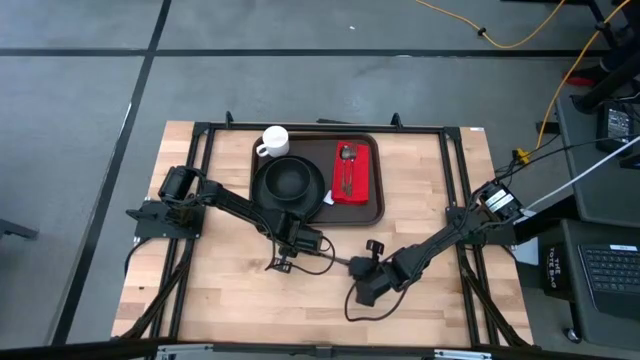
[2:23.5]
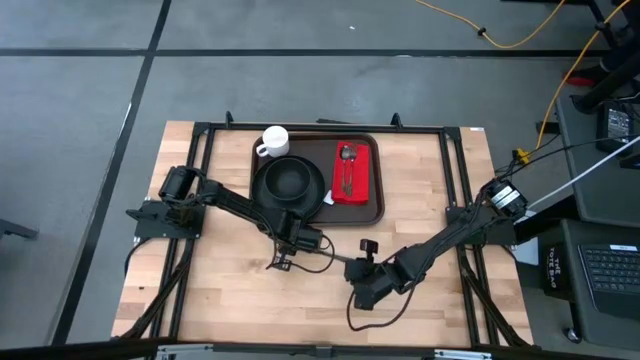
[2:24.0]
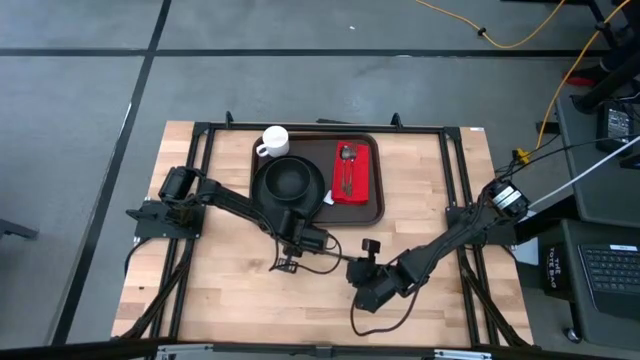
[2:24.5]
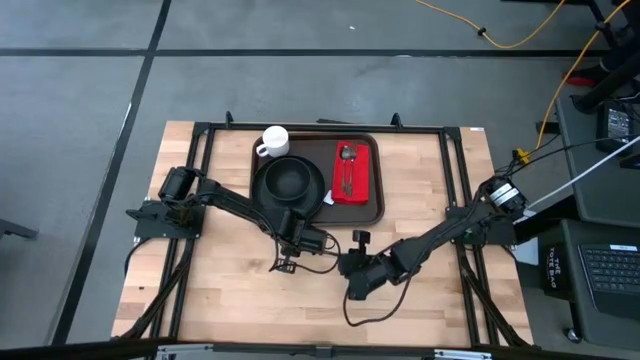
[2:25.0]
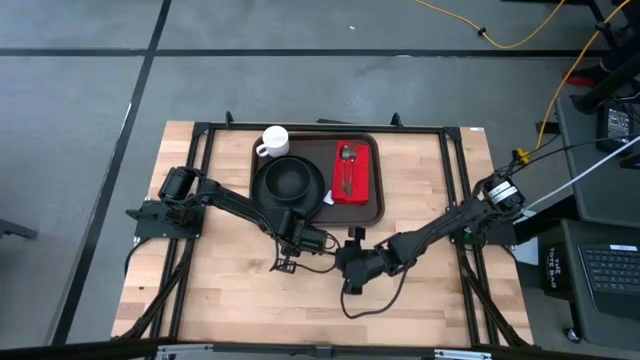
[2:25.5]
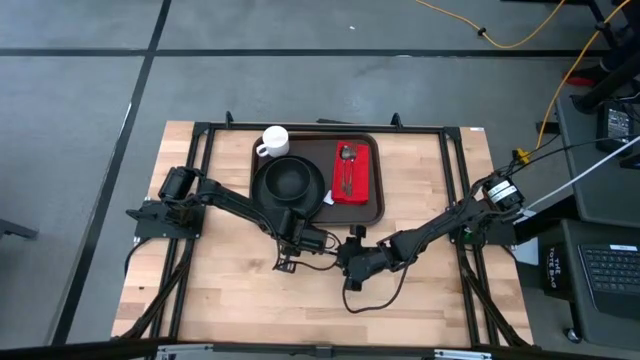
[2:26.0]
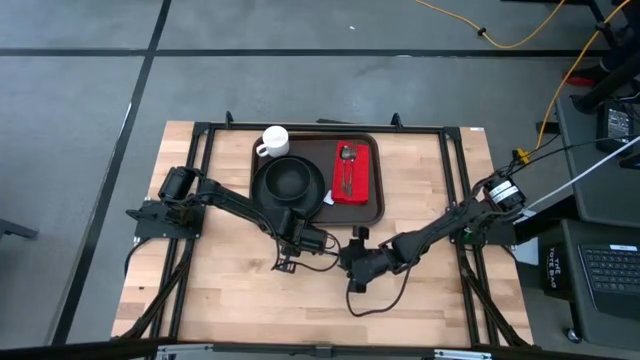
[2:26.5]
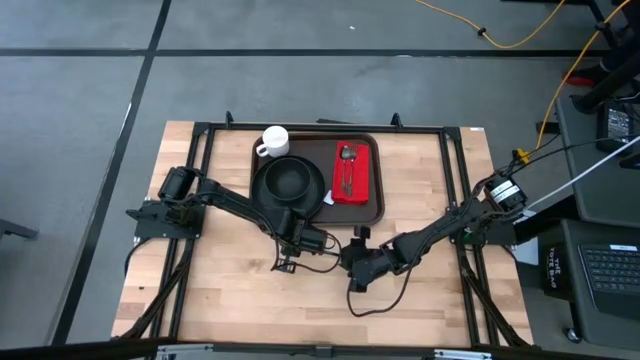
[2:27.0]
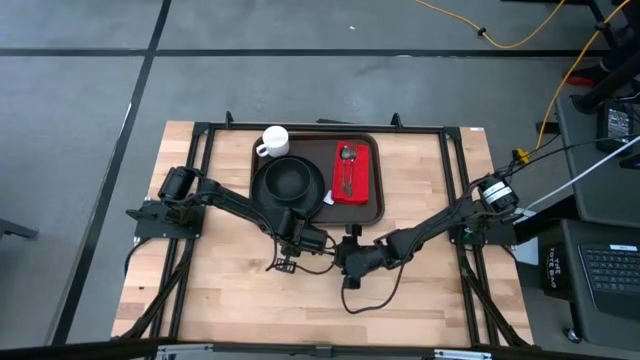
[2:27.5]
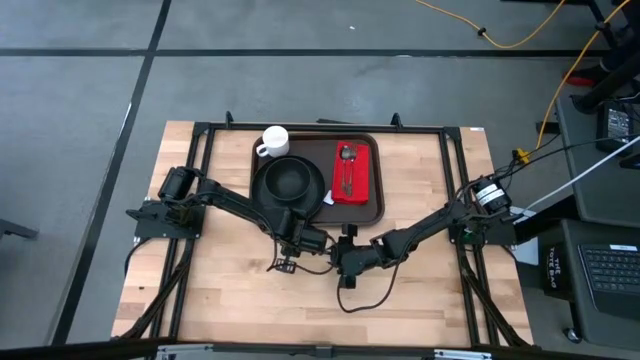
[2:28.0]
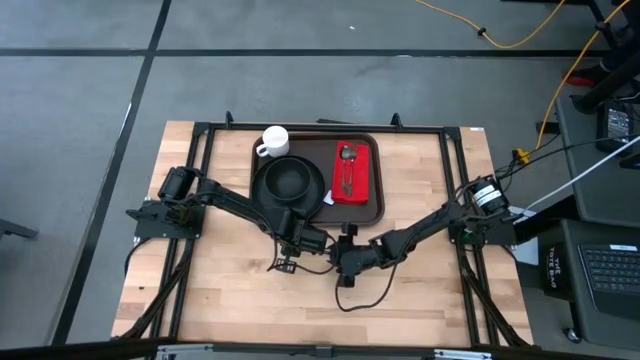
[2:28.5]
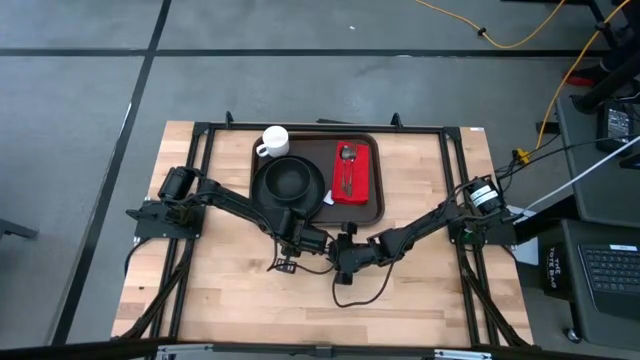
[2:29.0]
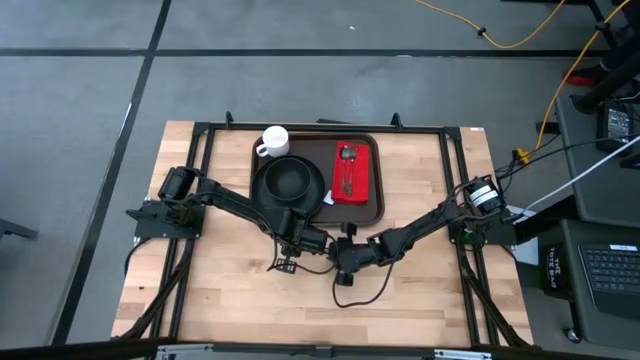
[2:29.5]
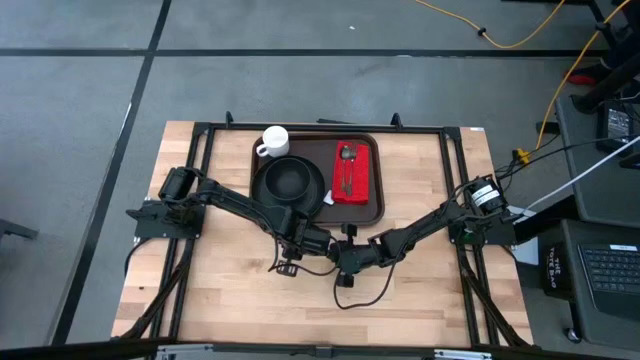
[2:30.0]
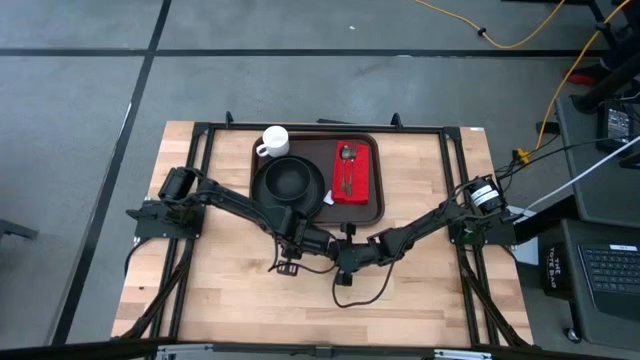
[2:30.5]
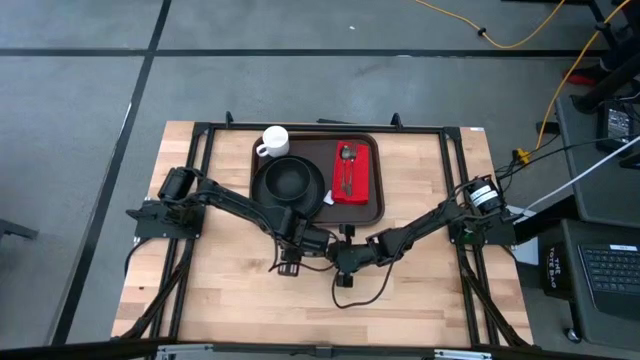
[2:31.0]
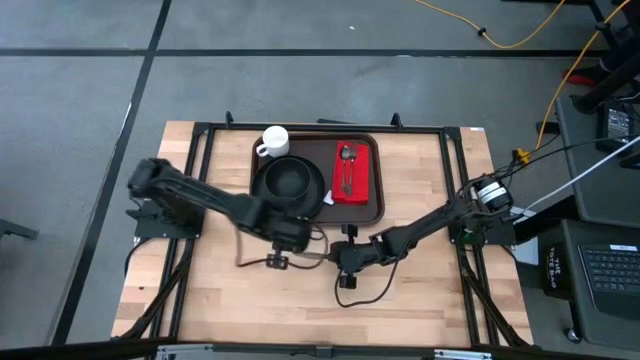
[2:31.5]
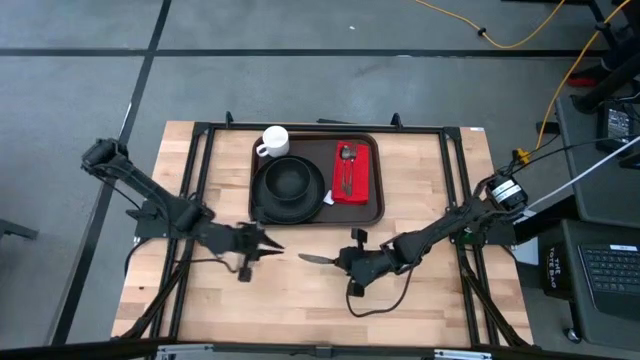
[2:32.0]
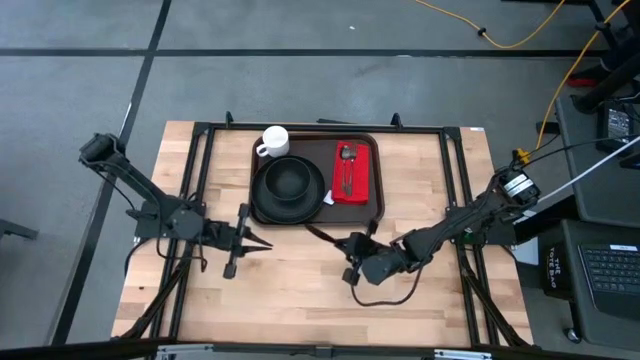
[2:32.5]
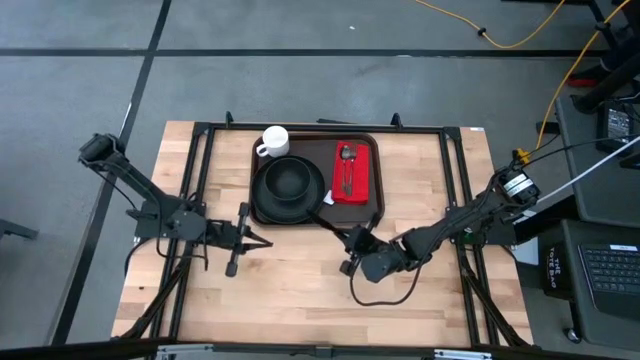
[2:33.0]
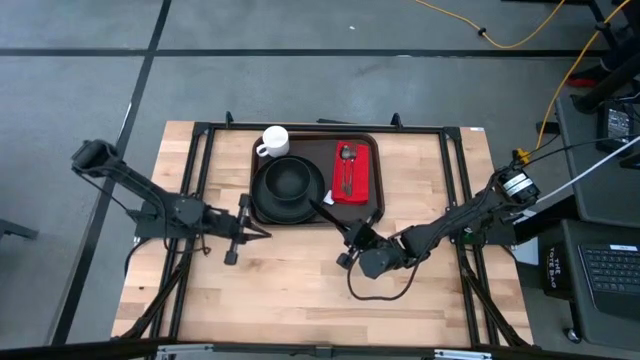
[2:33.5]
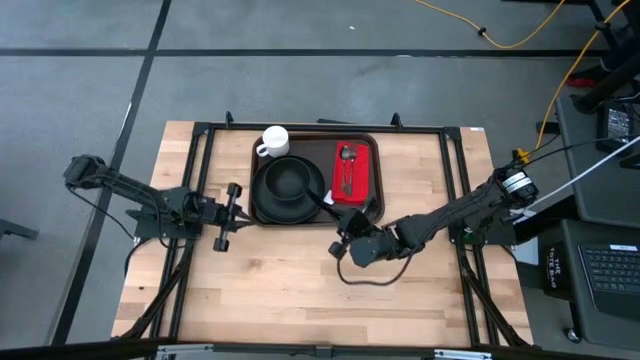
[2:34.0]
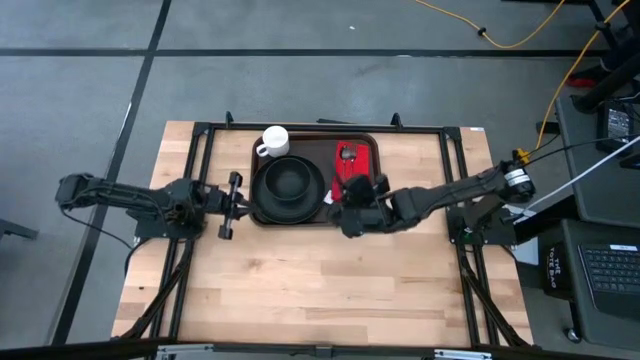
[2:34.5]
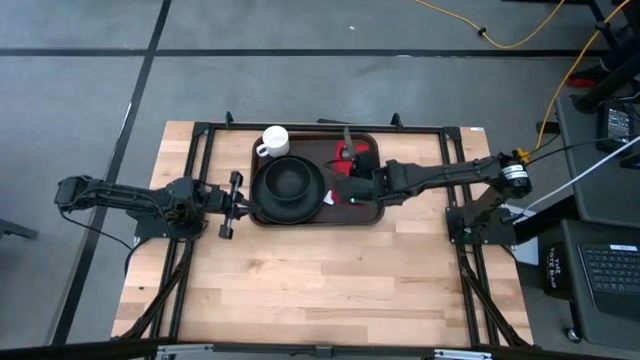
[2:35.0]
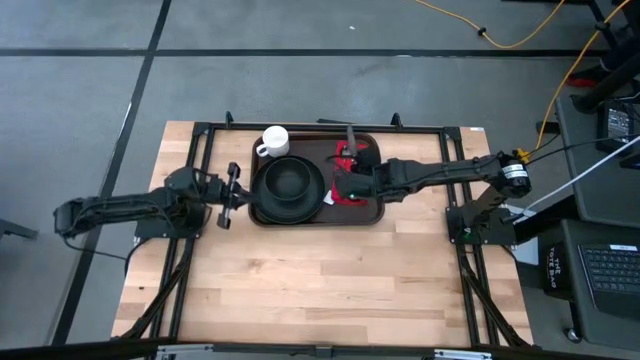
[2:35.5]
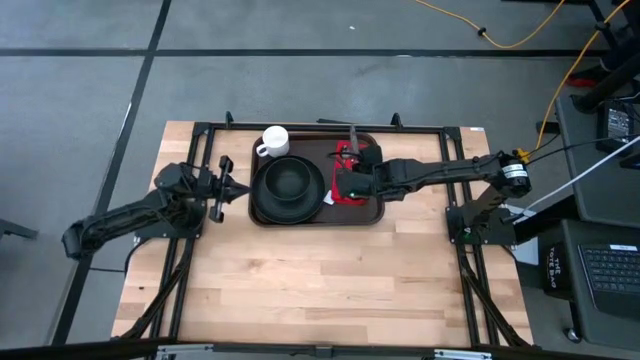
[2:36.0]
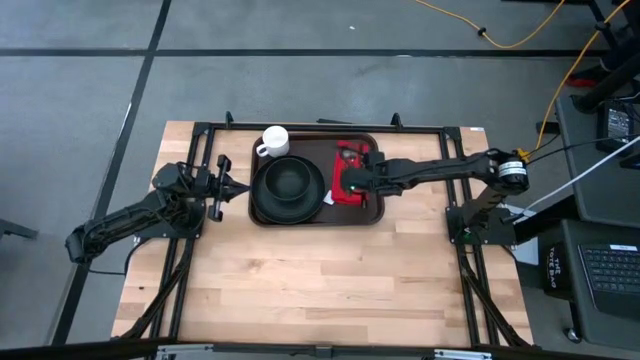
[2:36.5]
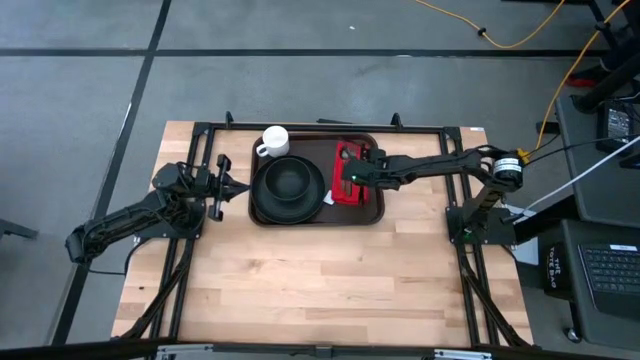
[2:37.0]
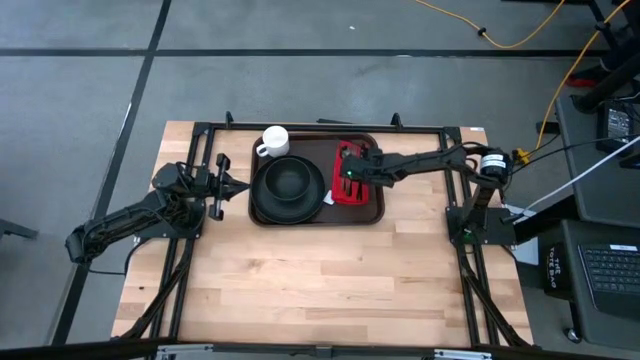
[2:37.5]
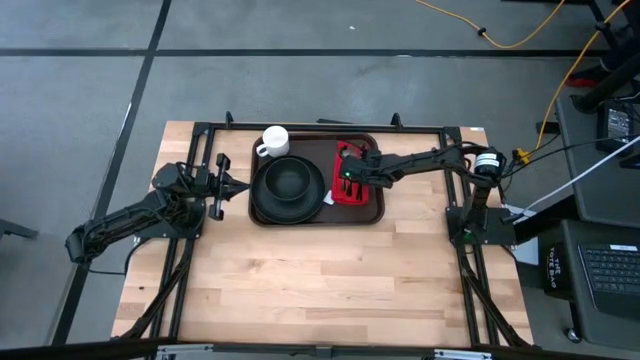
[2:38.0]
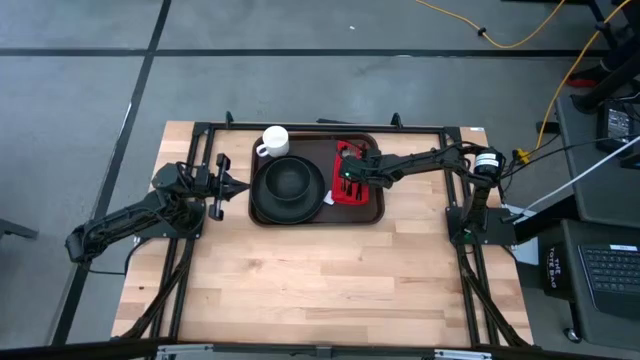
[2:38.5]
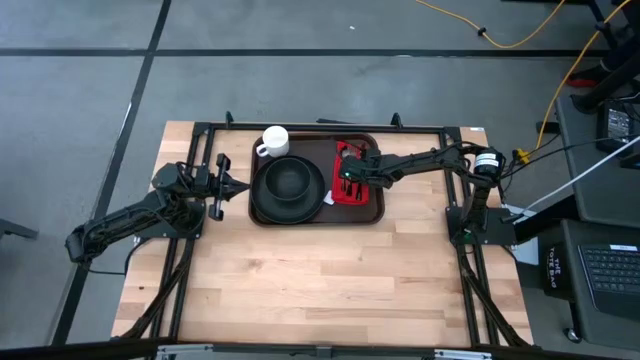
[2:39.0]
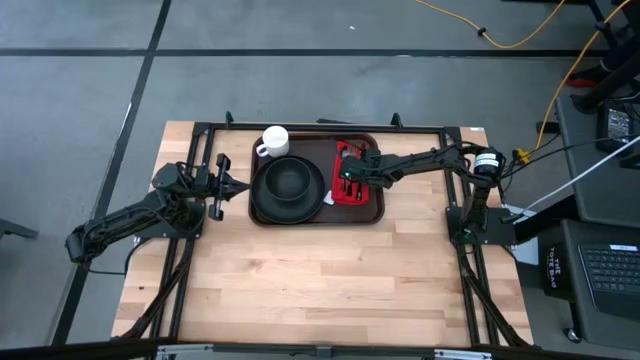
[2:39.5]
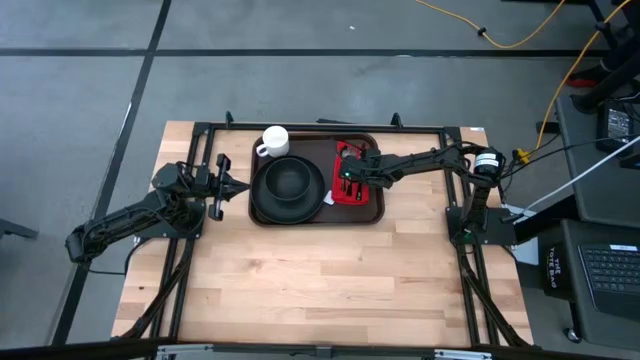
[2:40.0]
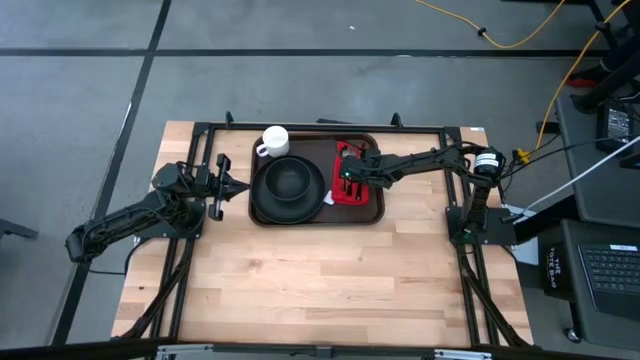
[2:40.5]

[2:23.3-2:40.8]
Task: Set up tray
Put the black table knife to the right of the black fork on top of the table napkin on the brown serving tray

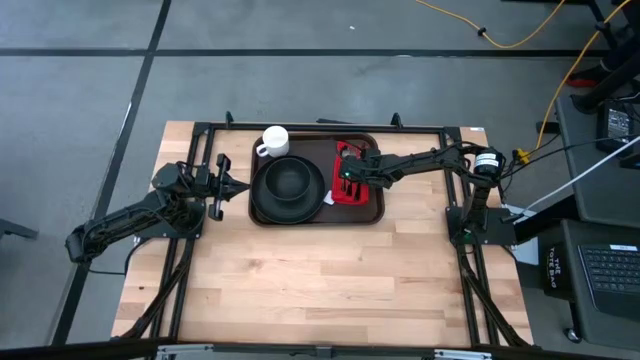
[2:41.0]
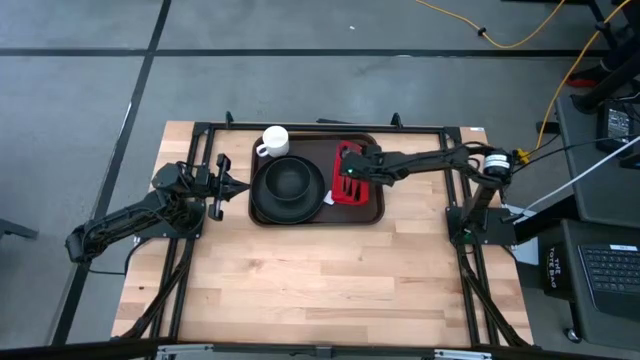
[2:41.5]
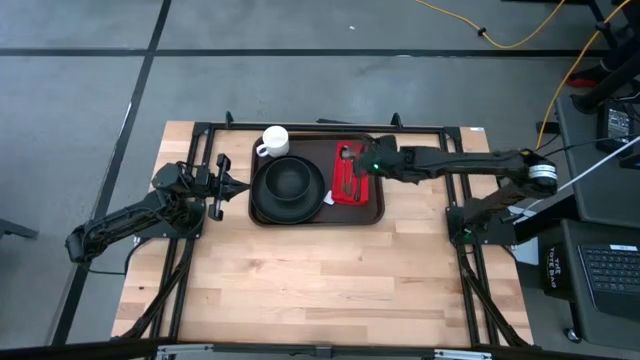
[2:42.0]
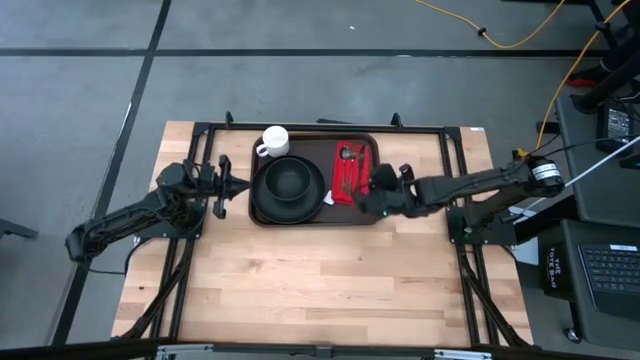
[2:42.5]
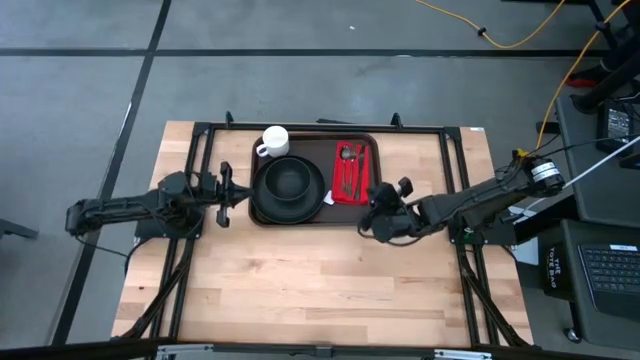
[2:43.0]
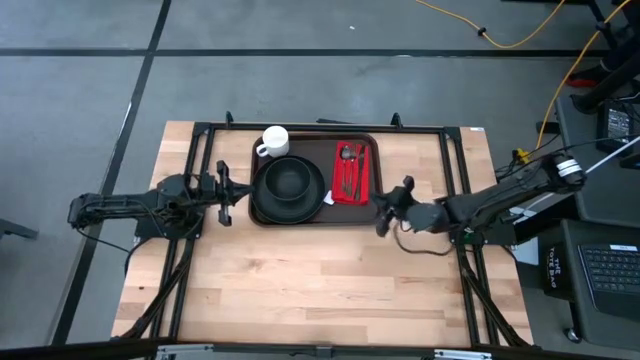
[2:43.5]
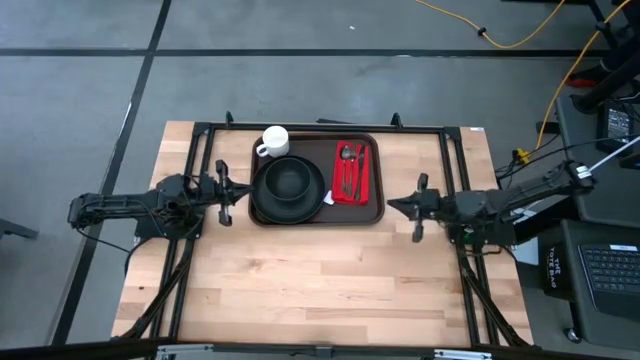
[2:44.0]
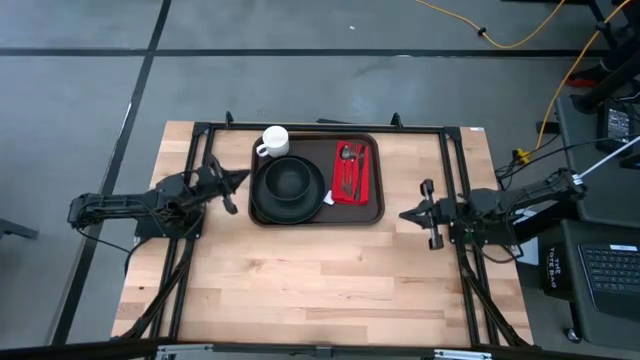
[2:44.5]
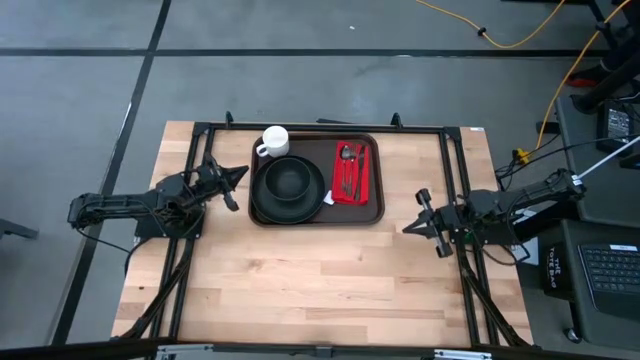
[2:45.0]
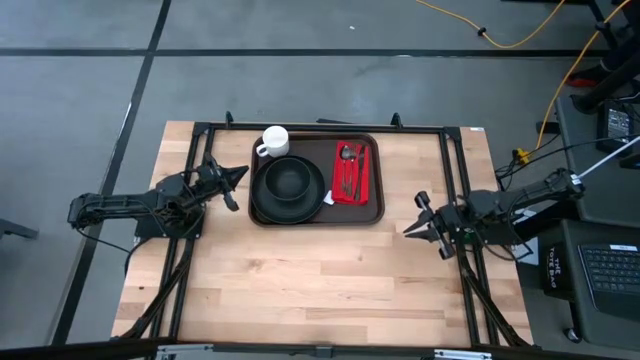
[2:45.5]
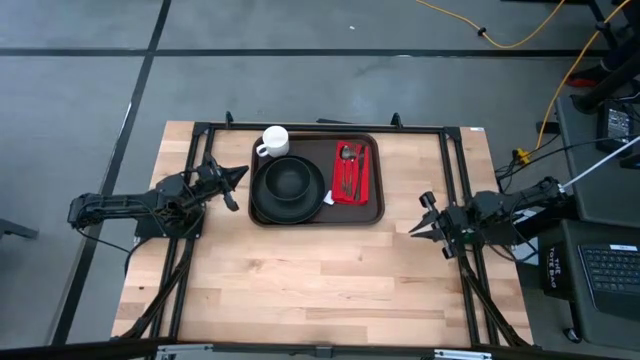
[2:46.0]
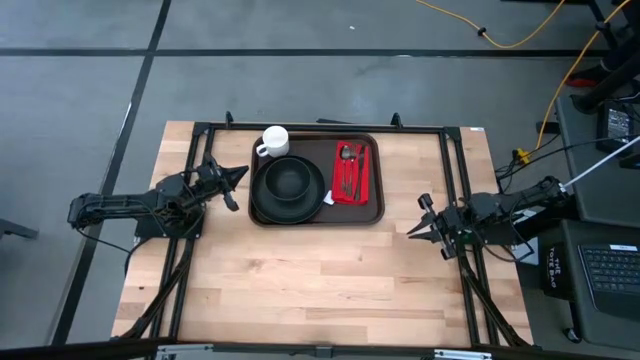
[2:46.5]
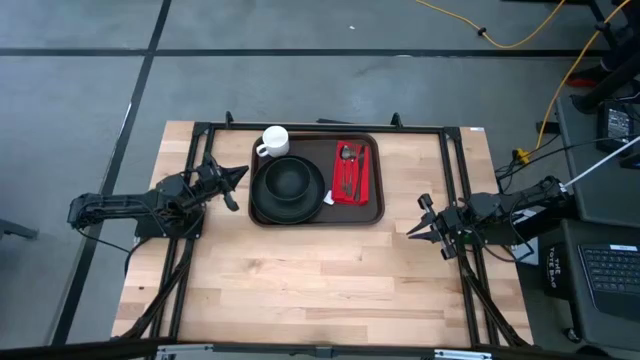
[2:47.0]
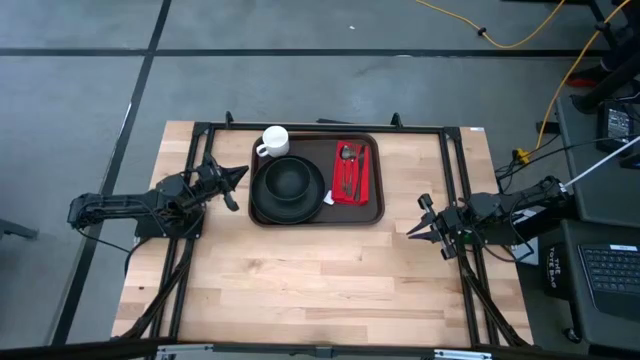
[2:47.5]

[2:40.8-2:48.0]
Return to Home Position
